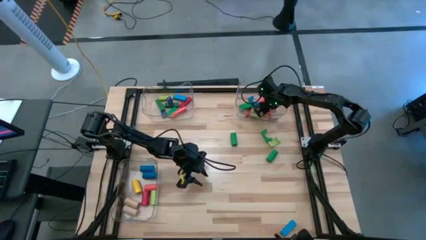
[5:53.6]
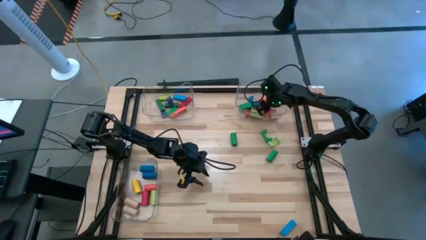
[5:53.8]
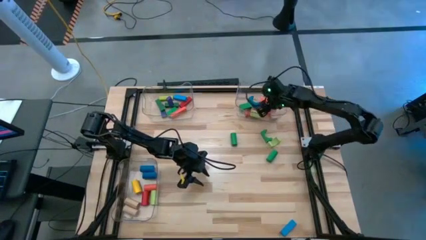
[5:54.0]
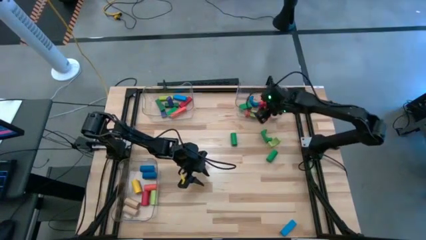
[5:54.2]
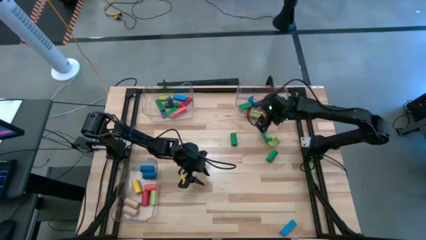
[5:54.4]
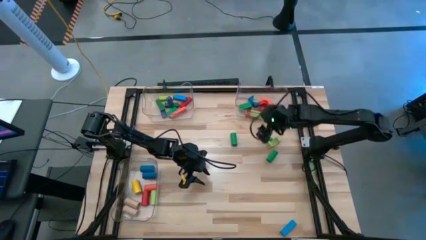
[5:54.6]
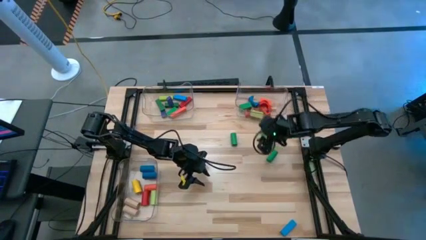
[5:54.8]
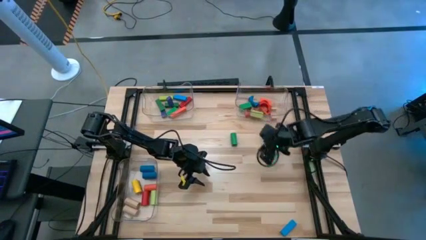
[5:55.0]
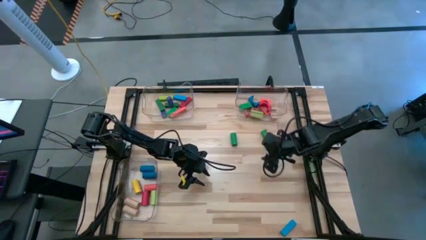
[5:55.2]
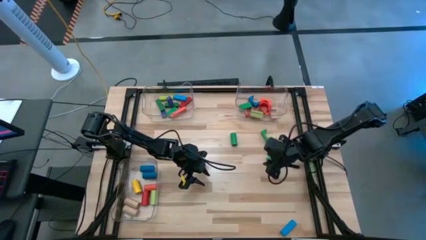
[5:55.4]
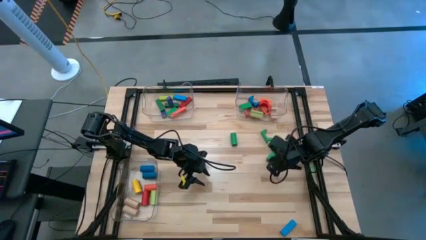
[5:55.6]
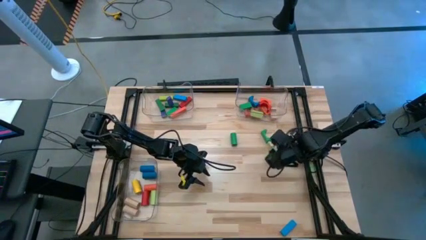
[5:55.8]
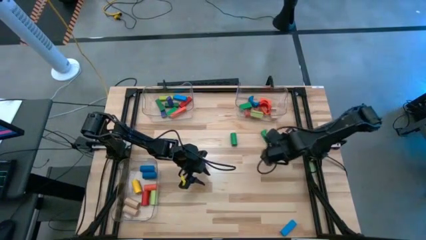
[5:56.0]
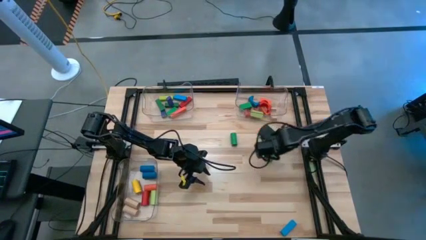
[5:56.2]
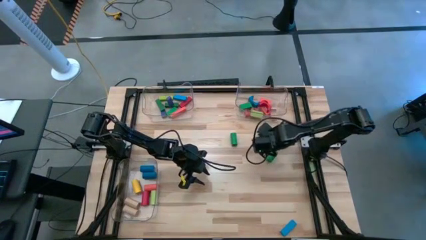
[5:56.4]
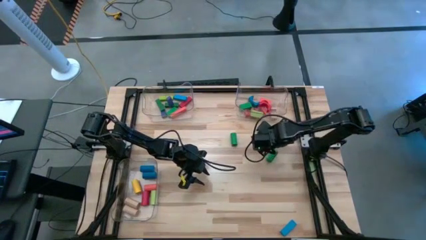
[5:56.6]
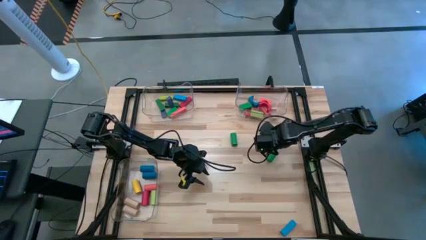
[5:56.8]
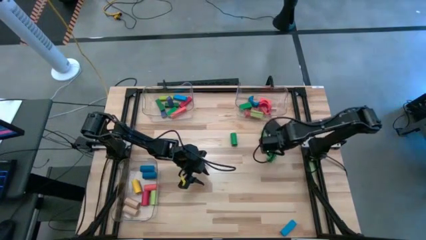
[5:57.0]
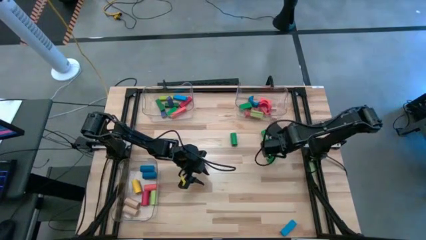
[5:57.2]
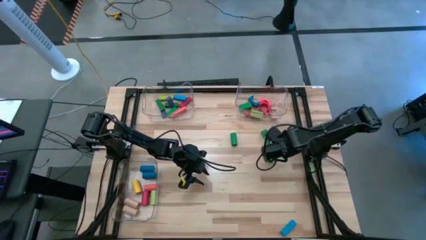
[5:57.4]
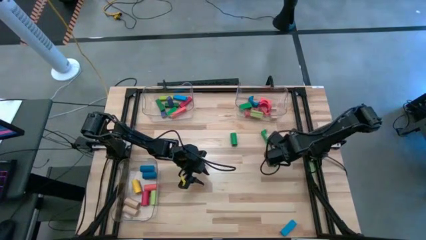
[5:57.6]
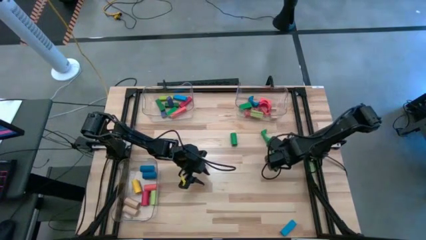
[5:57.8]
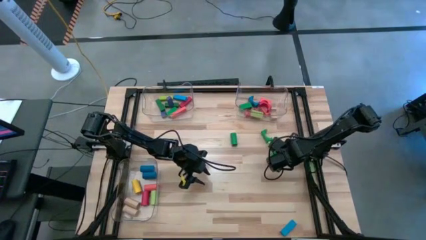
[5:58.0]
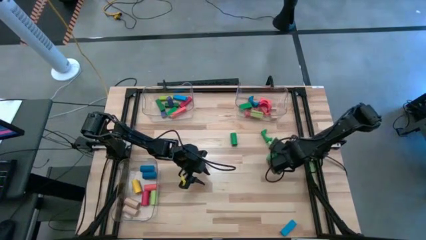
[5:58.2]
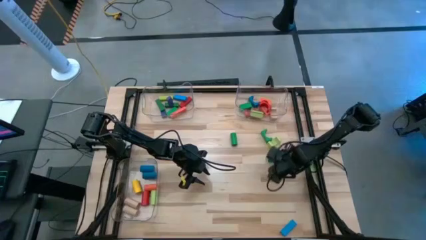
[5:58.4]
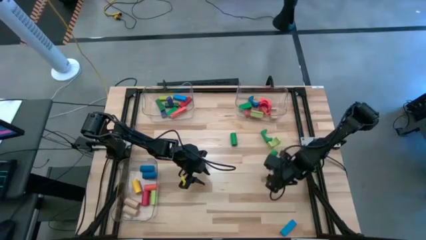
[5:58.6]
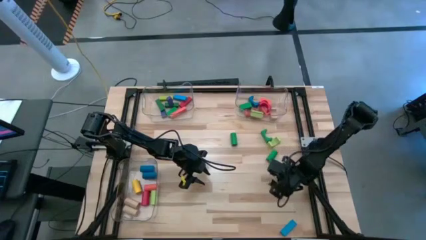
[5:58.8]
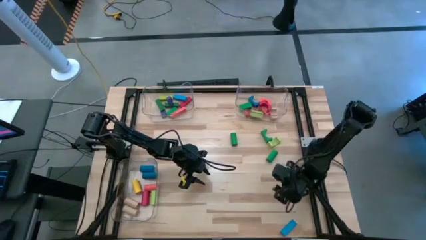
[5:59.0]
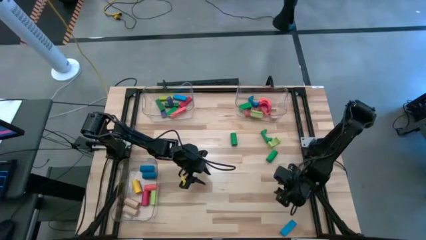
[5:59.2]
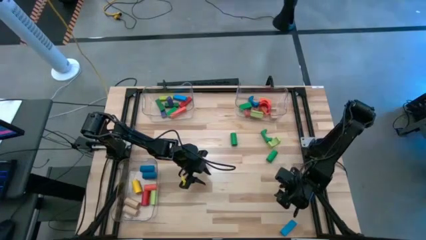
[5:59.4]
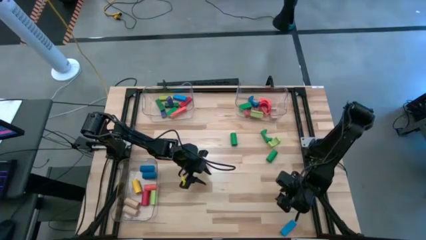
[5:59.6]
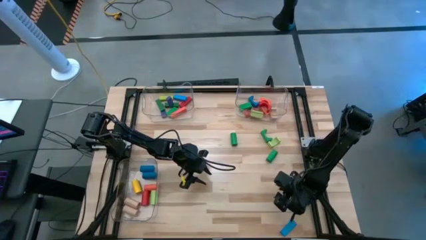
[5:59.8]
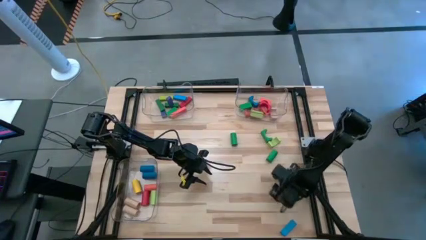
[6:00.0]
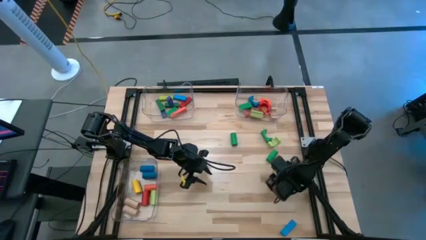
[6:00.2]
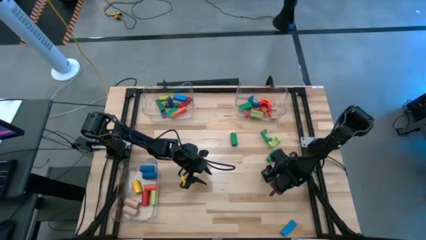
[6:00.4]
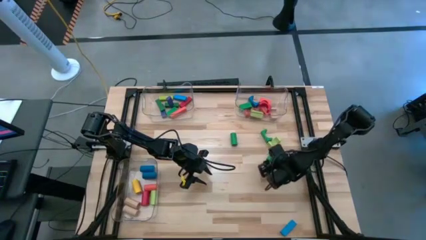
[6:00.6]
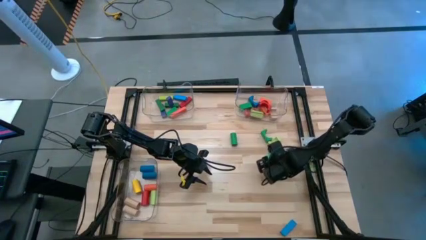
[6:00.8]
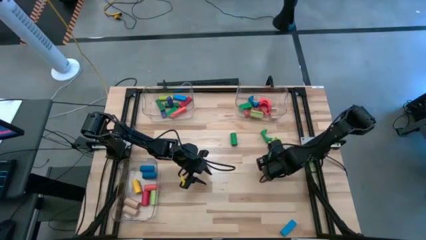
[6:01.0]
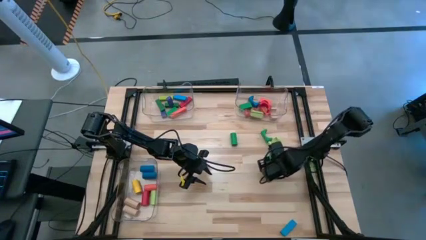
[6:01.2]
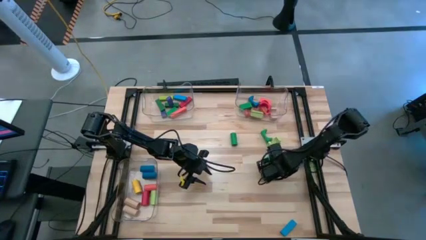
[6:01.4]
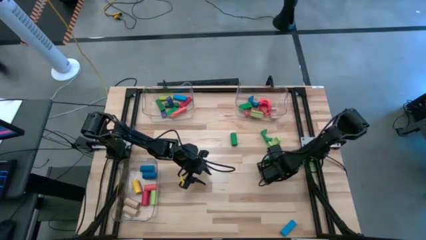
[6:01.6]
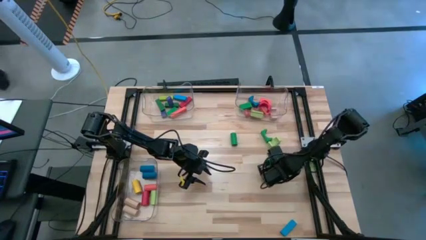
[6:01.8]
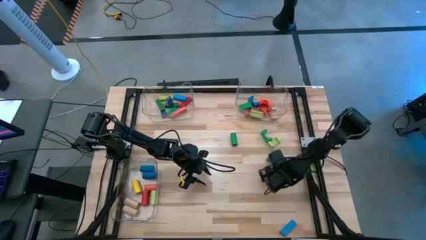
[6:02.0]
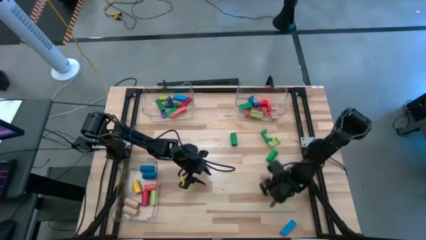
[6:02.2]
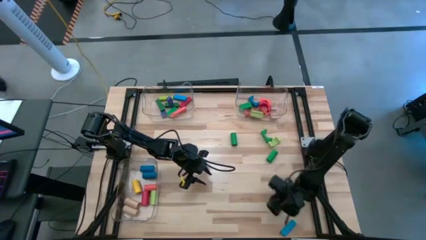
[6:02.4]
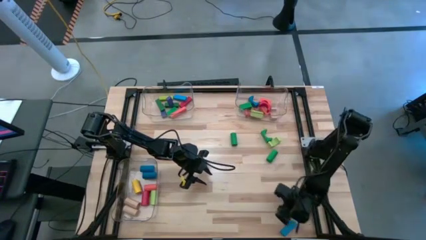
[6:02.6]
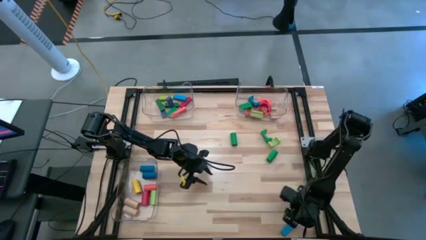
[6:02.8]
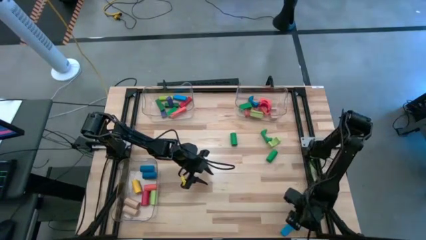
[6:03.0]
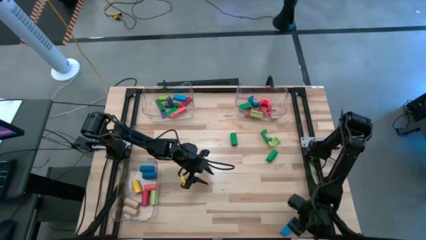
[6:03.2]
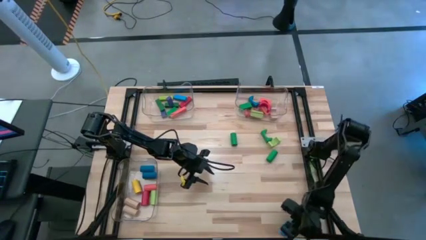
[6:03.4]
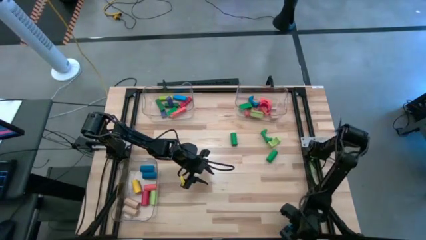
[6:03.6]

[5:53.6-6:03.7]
Task: Sort blocks by size
Put the blue rectangular block into the top left transparent bin

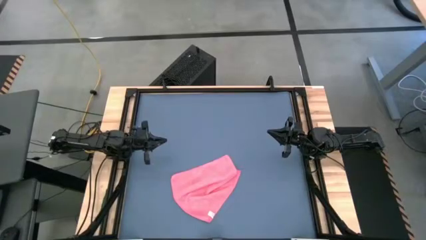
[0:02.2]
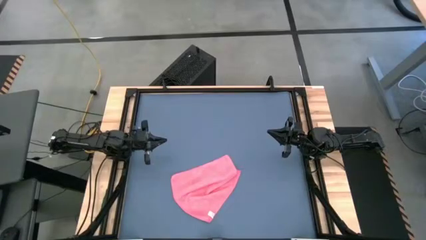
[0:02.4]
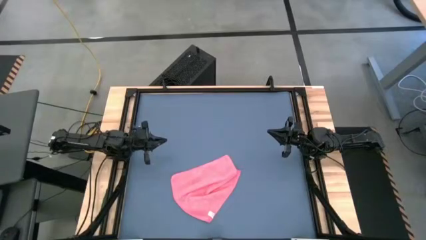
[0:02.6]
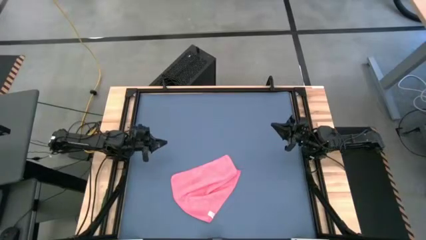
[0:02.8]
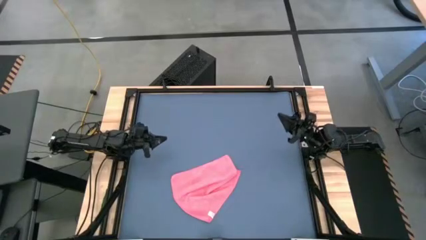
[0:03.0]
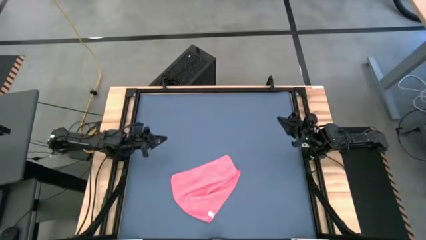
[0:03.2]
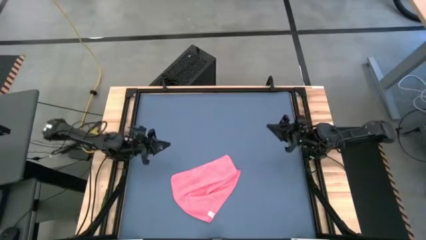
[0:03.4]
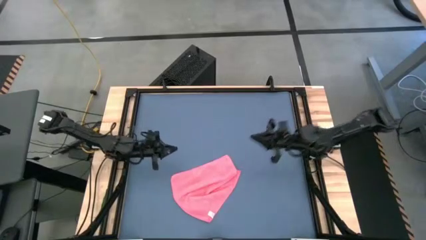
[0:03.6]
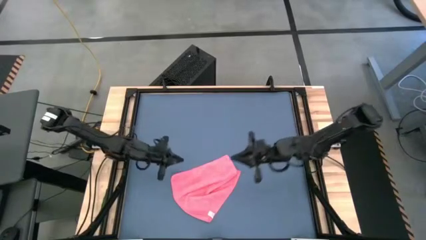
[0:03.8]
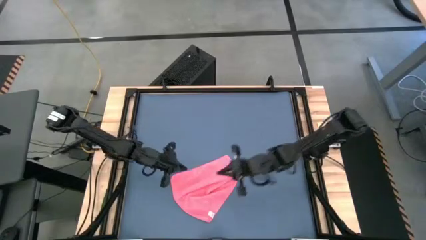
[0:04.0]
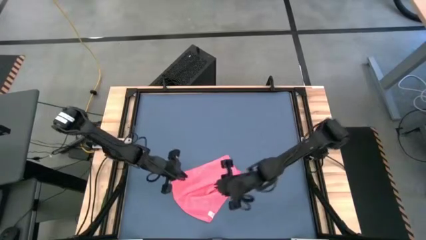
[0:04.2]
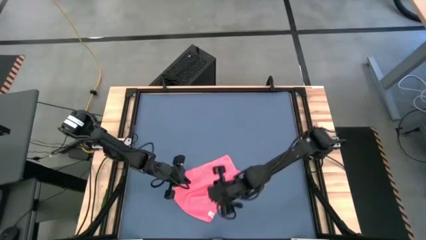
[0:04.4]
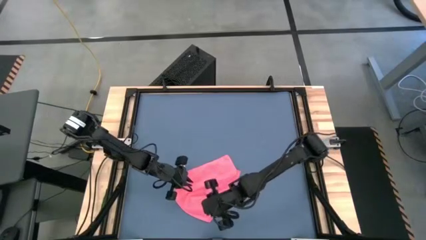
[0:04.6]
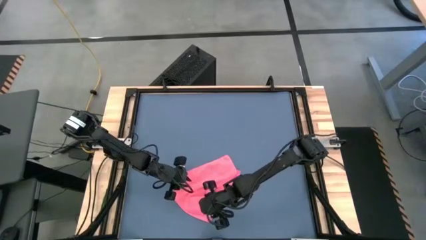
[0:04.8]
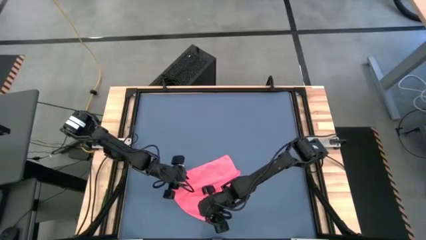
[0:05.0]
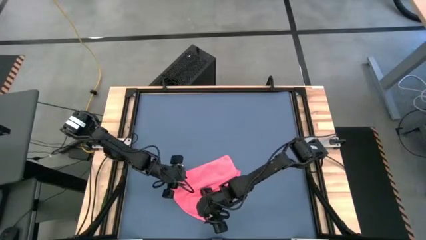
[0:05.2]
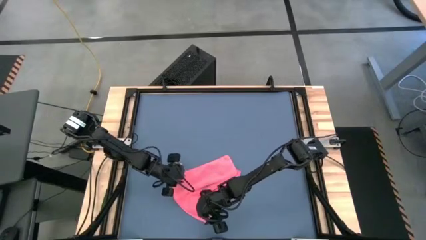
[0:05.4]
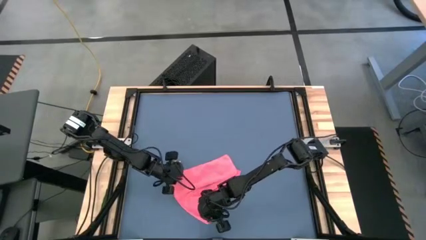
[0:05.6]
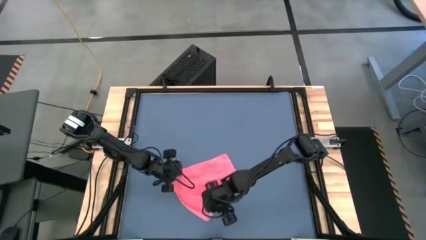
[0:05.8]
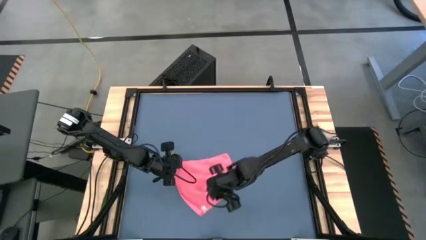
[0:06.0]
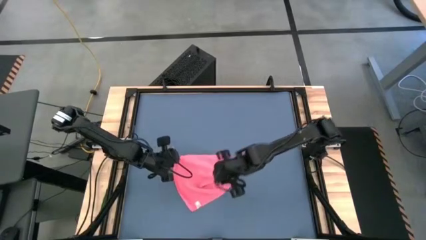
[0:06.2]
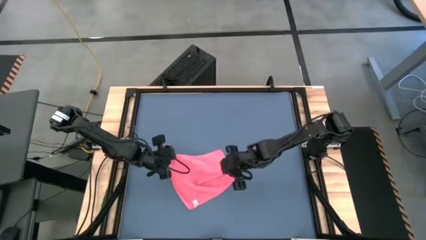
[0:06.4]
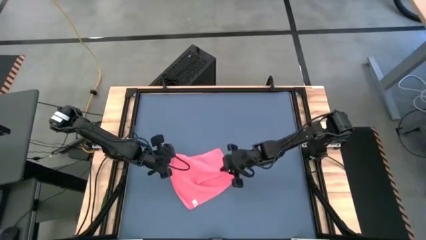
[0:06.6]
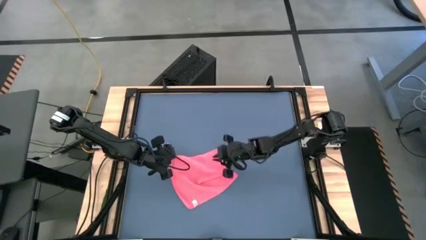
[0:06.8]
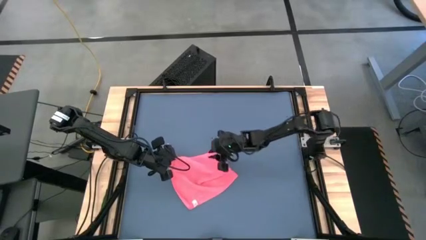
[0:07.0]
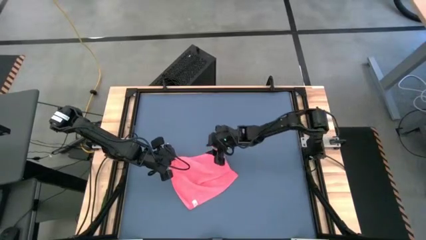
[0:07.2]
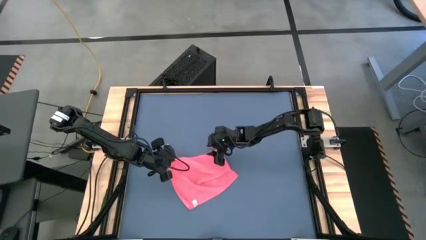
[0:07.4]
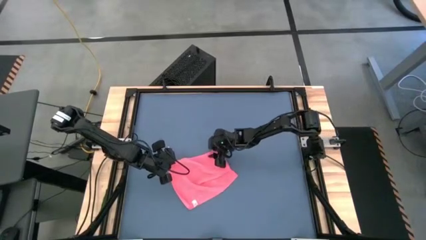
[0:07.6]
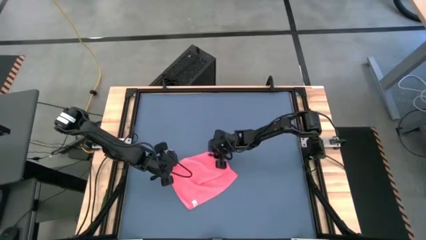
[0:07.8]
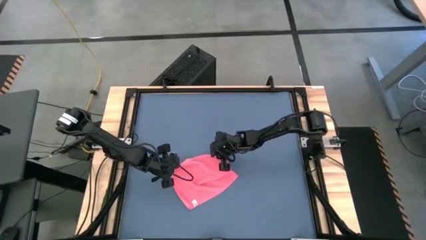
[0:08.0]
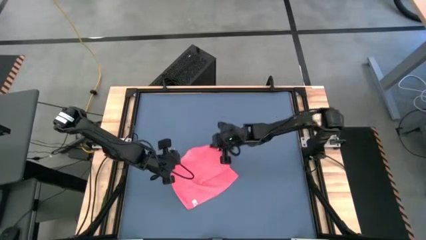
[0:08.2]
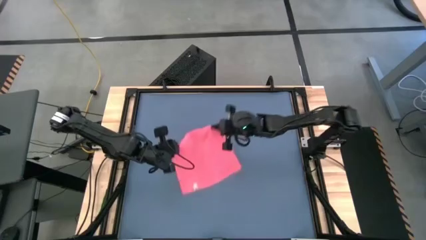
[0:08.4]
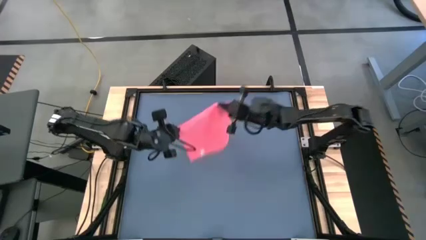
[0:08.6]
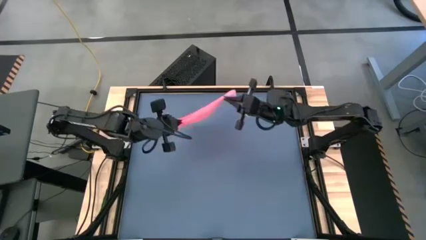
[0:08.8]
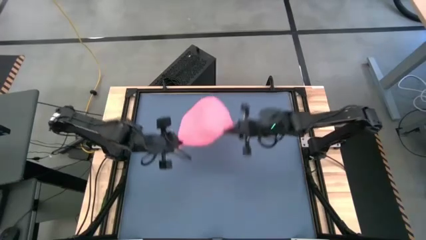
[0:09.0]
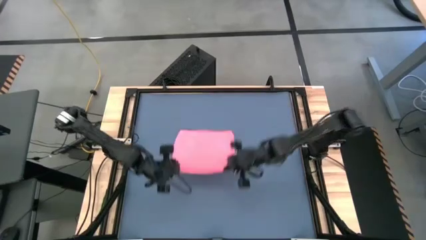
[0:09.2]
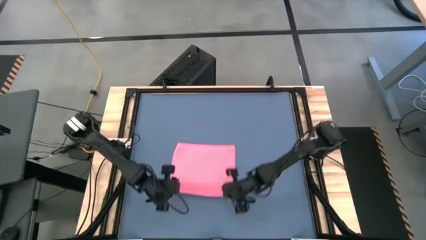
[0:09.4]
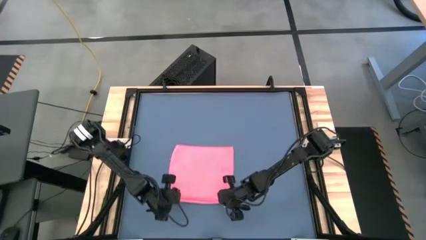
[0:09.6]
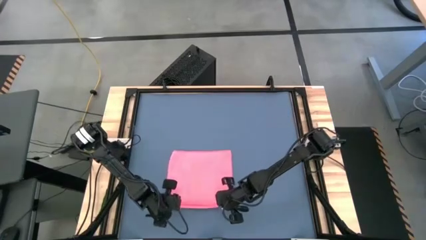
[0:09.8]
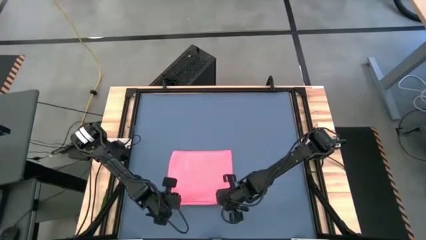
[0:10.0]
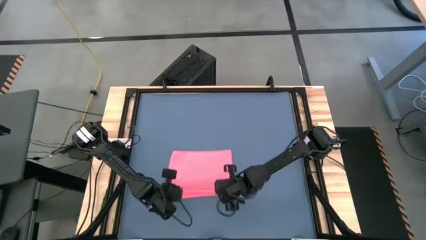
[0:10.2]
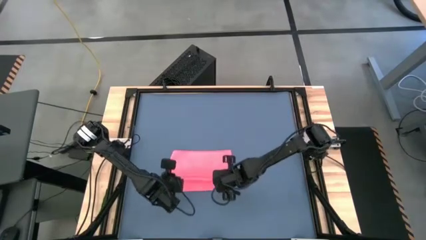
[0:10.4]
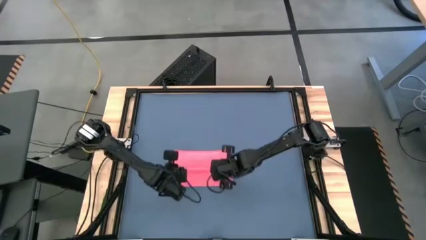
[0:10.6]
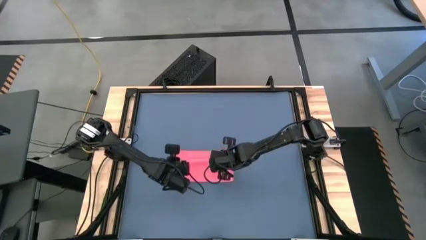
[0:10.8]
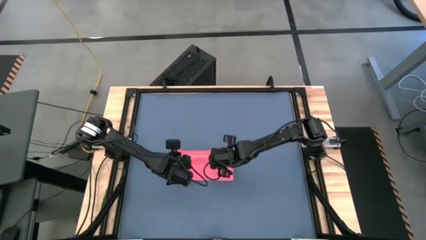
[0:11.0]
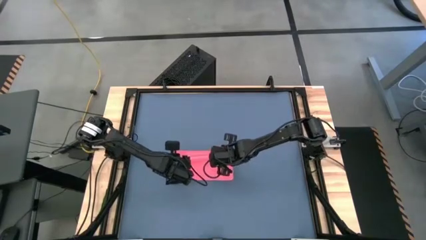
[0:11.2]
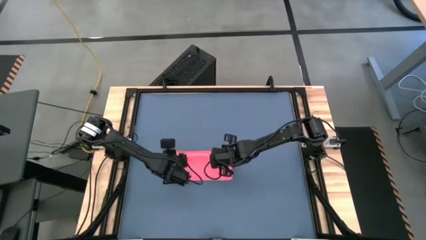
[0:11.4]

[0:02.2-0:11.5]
Task: Roll towel into tight, uniform cylinder
Fold the red towel
